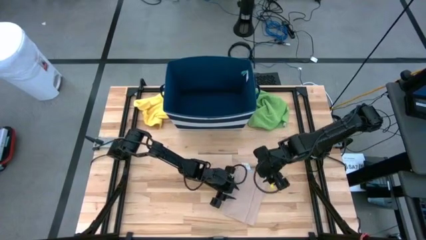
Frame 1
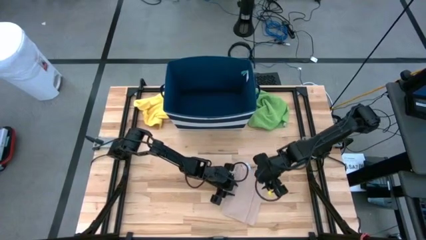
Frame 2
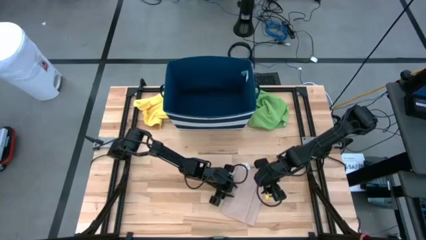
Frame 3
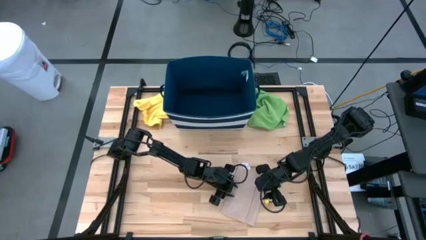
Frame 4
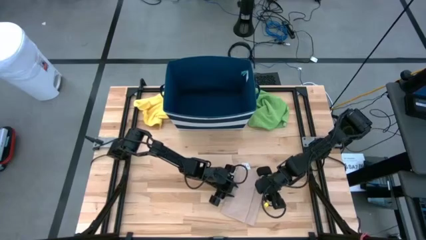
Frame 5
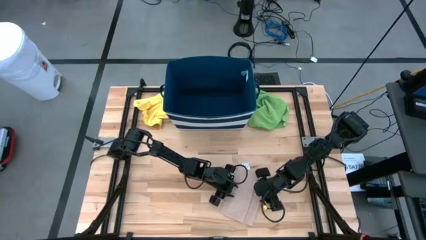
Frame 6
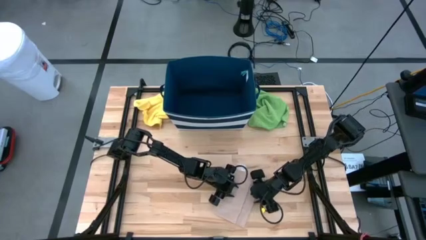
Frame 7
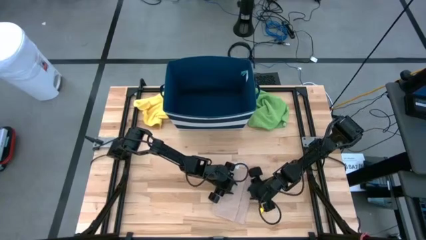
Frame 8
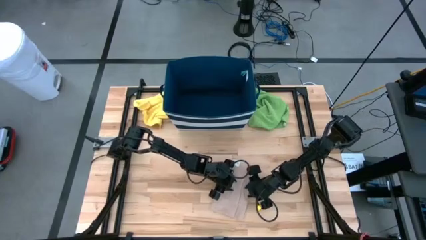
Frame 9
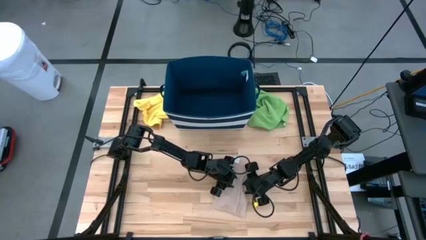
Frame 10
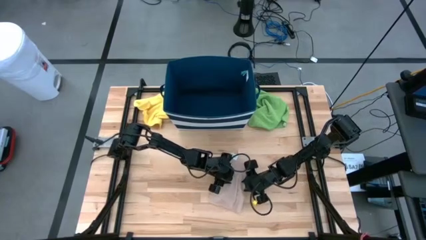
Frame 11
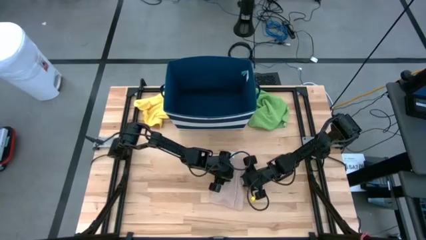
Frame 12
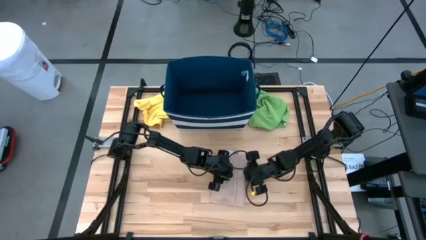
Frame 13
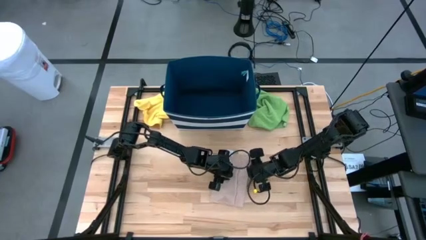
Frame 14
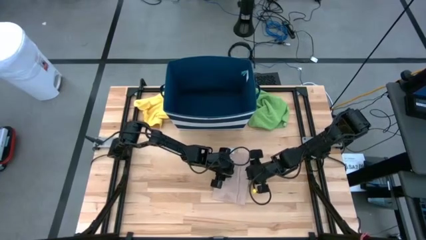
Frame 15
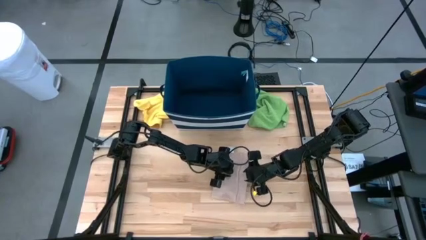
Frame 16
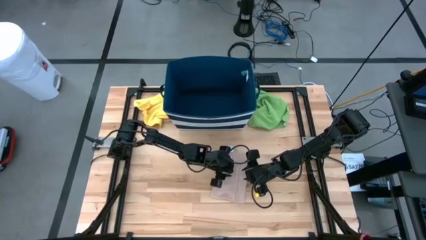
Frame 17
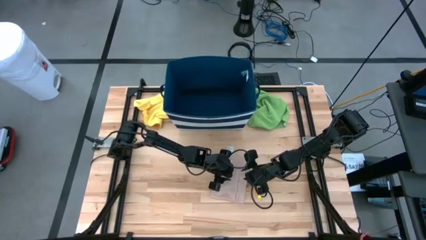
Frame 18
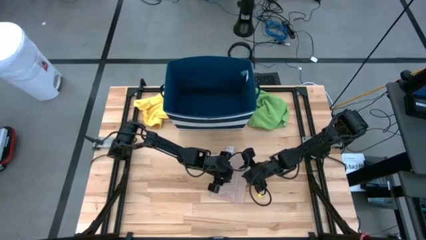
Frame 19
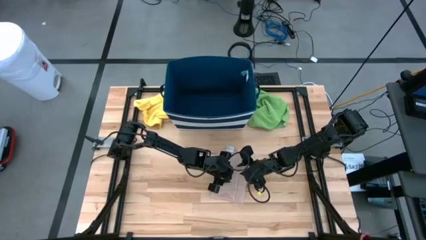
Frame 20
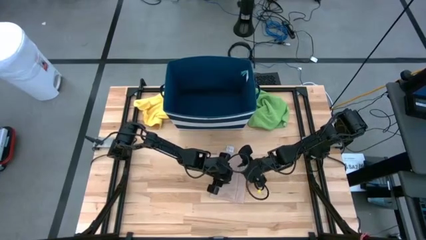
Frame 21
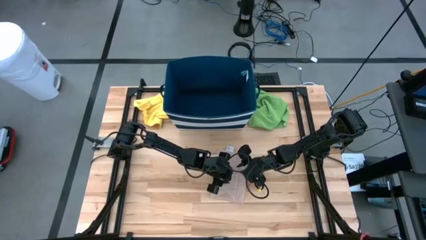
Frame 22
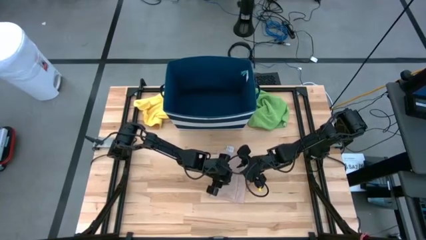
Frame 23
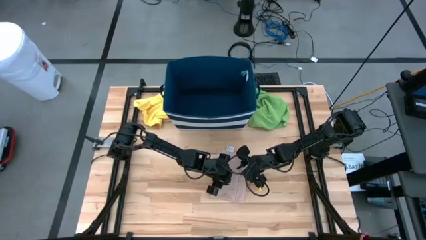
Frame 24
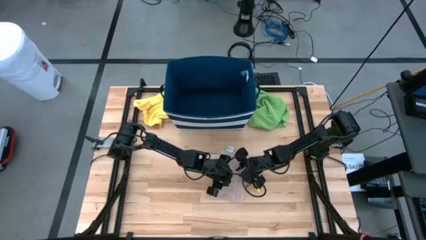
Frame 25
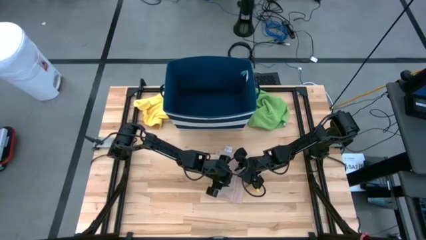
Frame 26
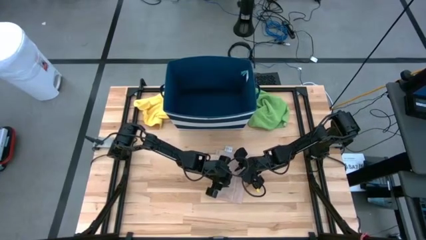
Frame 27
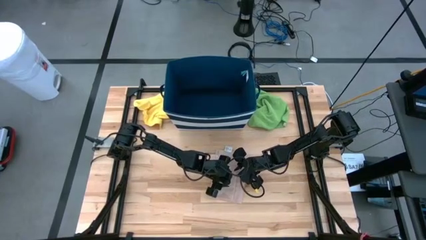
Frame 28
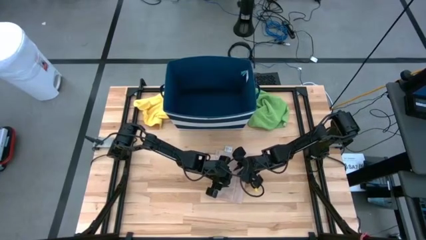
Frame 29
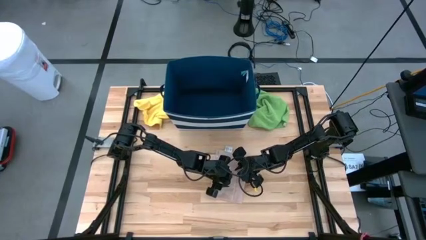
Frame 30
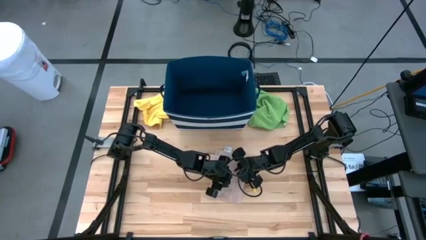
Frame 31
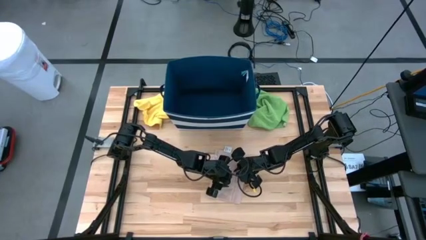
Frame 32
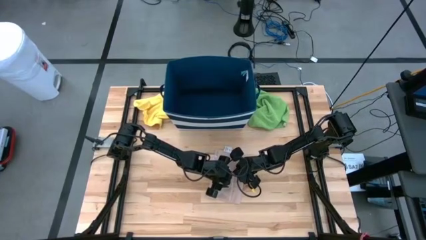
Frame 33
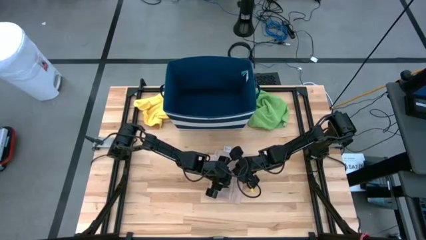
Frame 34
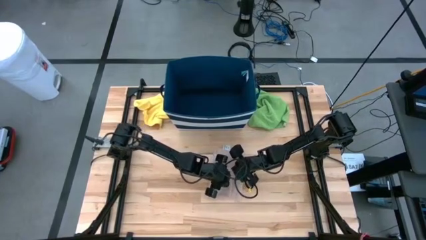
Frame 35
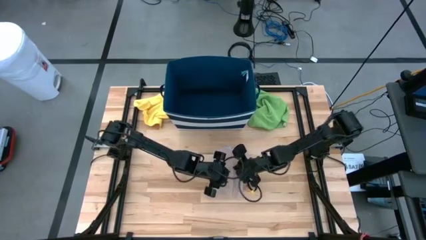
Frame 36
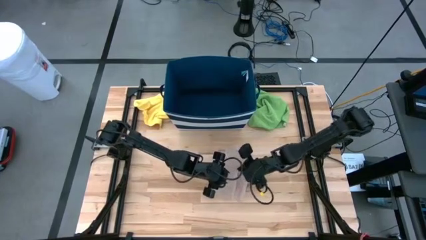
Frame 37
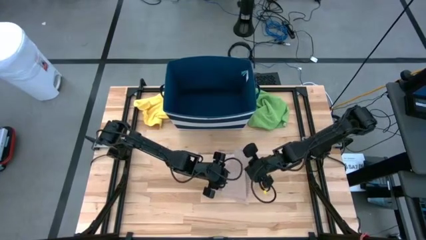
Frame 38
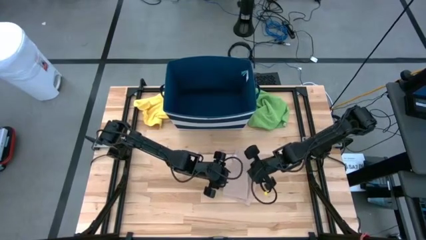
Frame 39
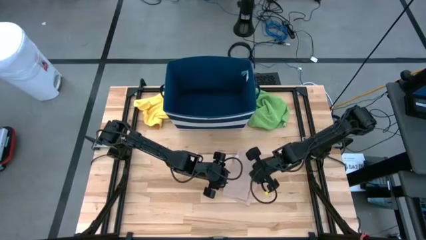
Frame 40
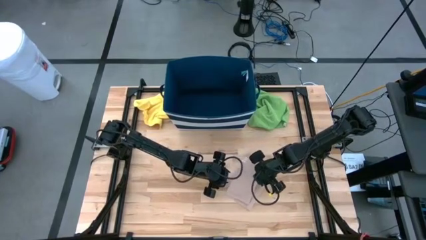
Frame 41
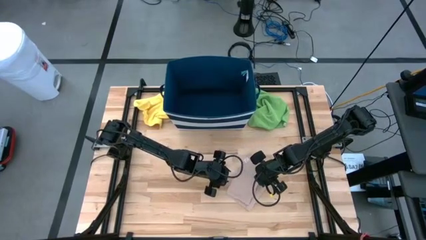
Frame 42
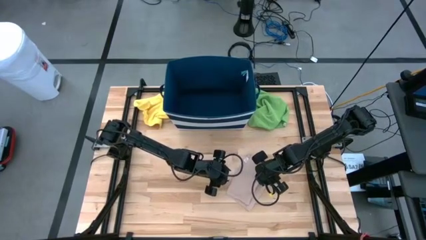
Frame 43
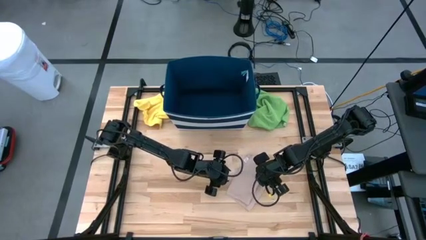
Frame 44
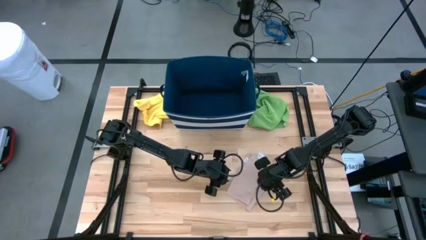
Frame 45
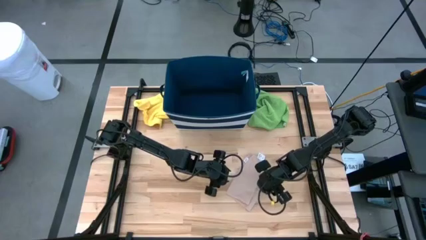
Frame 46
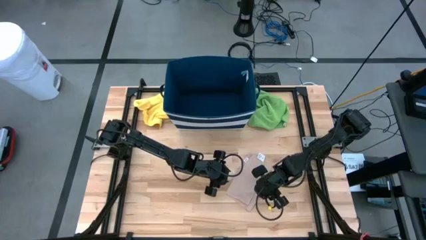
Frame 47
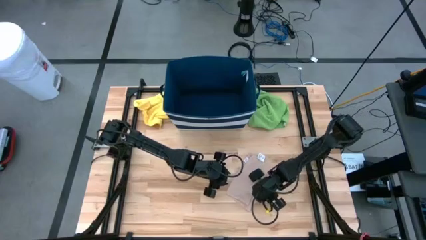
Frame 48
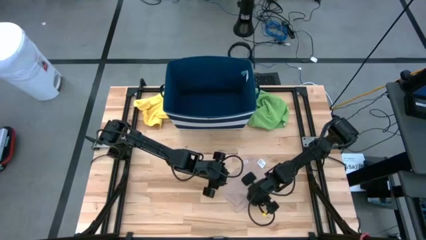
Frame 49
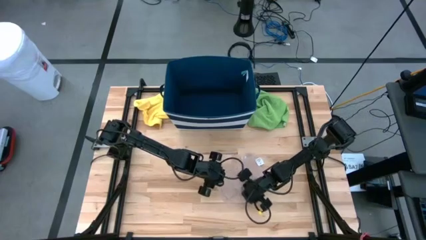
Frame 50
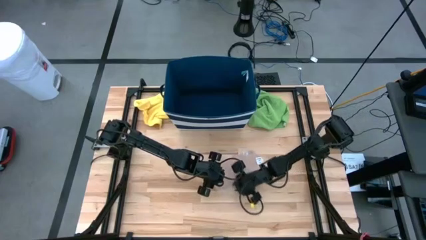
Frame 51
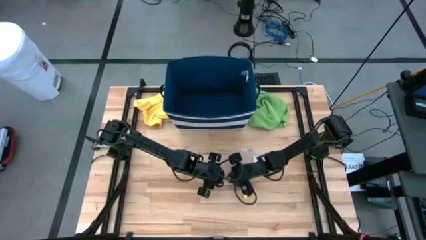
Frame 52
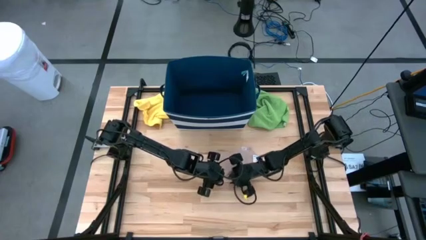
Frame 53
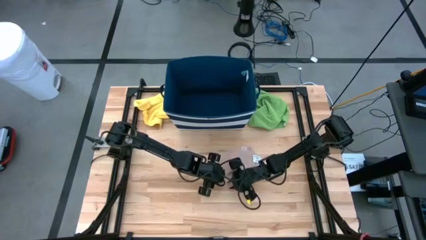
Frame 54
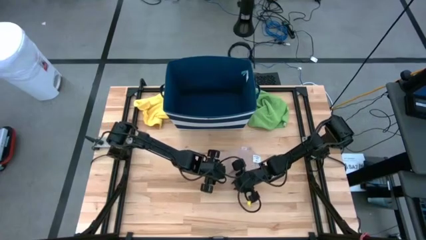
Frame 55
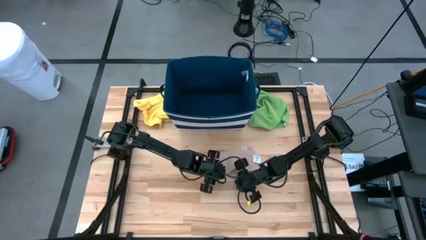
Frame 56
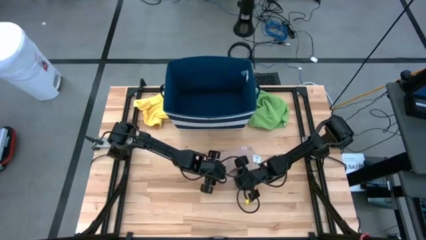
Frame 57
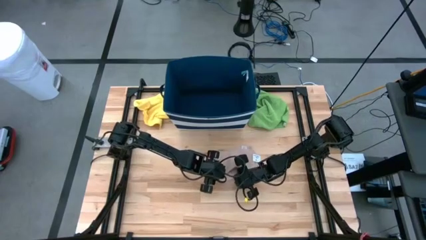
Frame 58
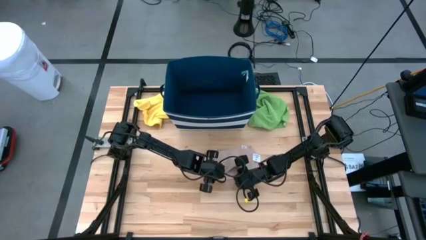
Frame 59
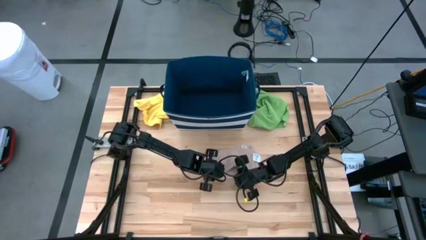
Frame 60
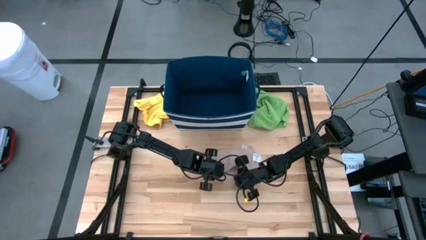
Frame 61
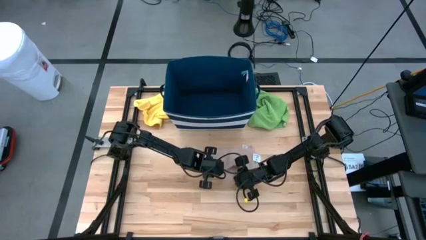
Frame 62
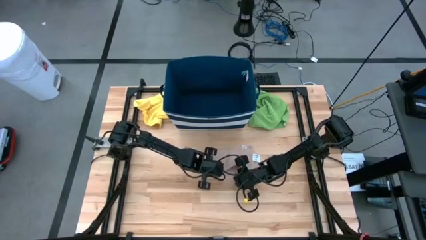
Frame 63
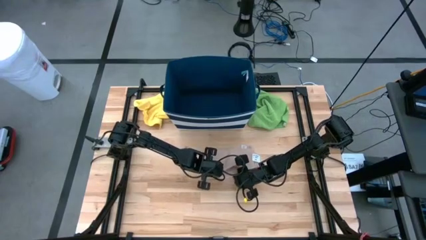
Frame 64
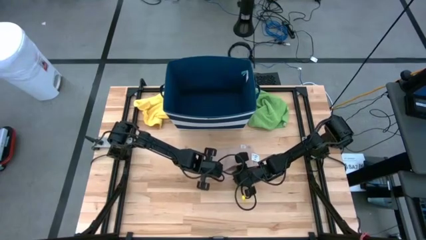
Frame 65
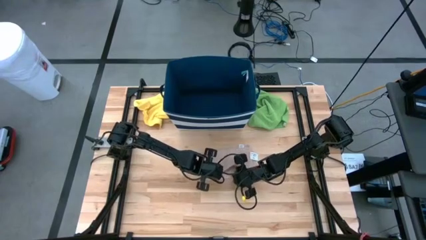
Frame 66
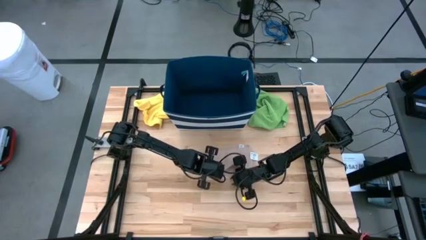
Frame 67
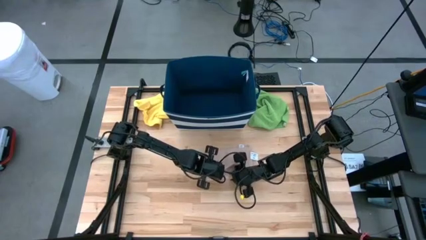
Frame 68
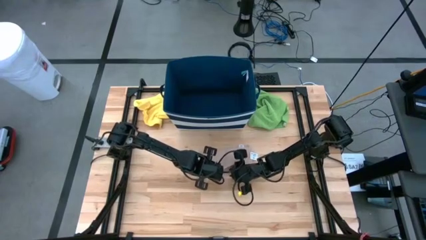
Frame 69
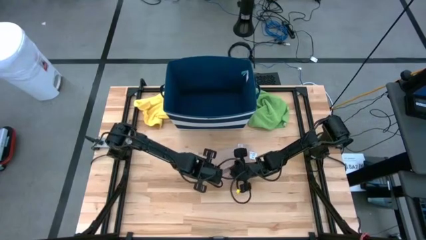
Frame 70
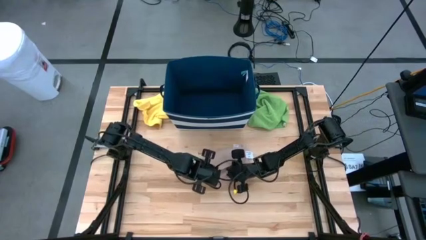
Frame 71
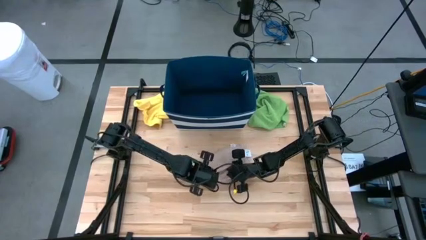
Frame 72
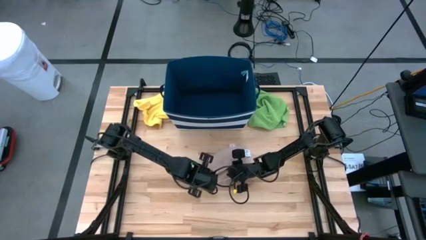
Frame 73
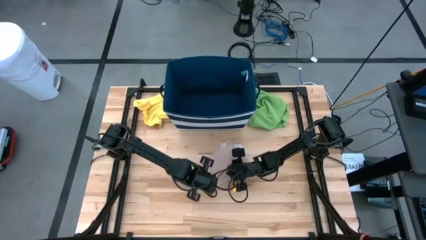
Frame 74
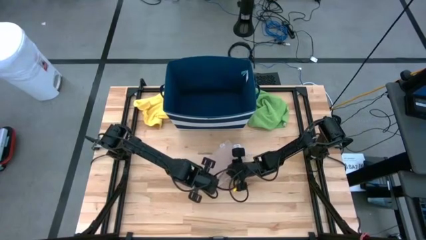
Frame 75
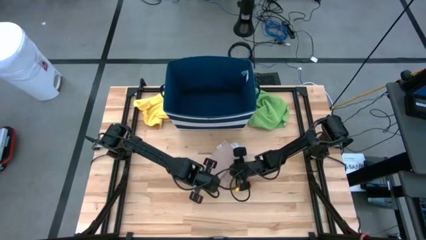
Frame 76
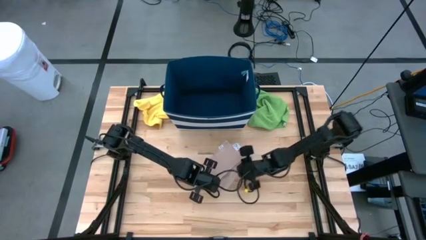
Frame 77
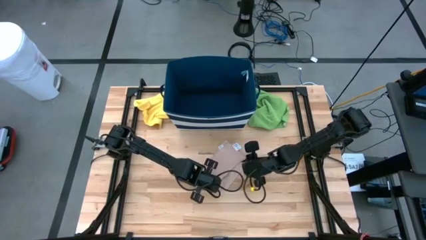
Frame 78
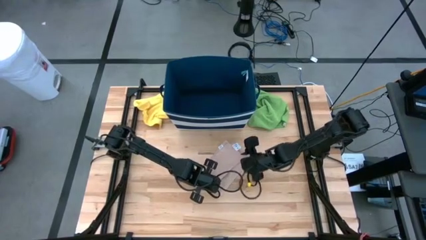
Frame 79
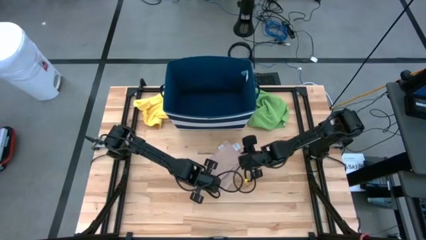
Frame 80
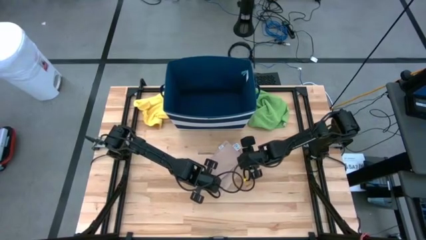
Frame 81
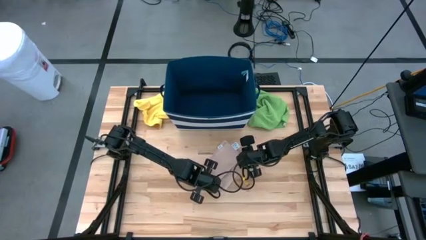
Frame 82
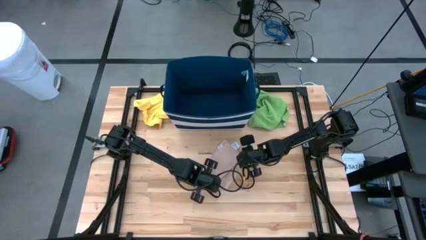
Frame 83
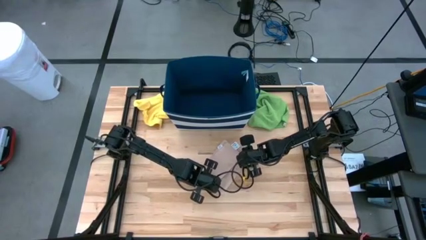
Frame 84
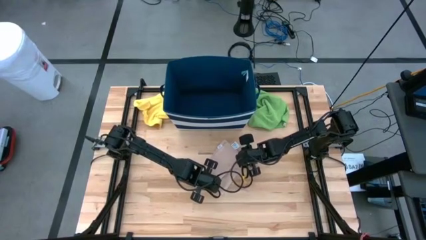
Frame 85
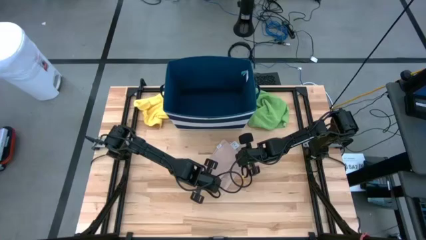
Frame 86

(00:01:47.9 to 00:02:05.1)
Task: Fold towel
Fold the brown towel

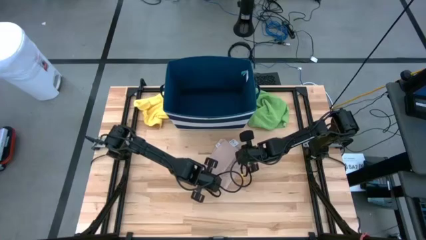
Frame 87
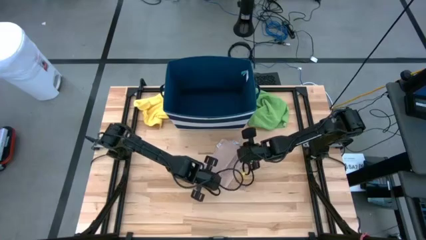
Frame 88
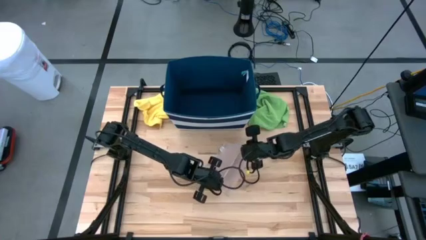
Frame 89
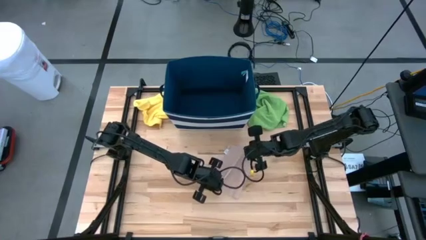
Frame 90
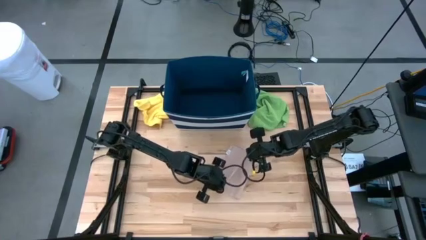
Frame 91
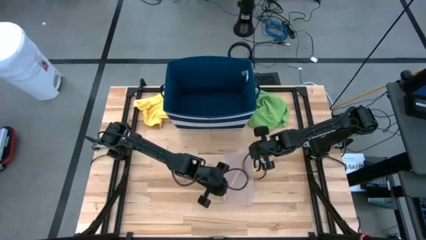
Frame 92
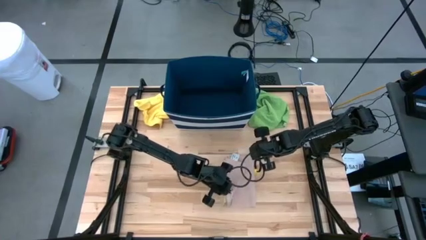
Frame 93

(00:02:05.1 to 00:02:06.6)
Fold the brown towel
